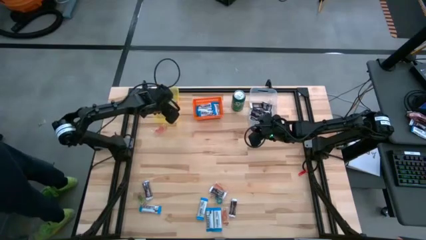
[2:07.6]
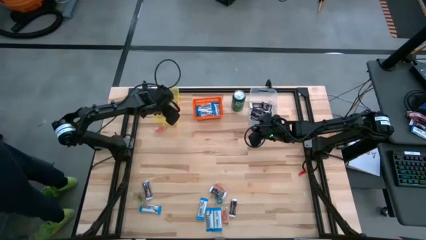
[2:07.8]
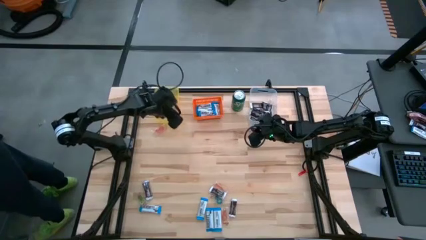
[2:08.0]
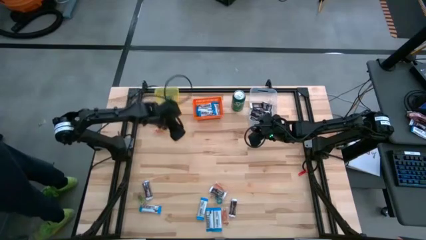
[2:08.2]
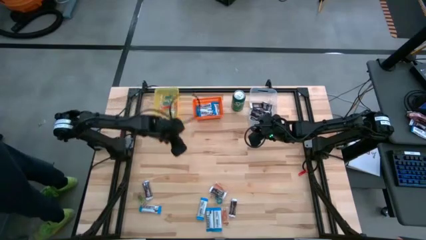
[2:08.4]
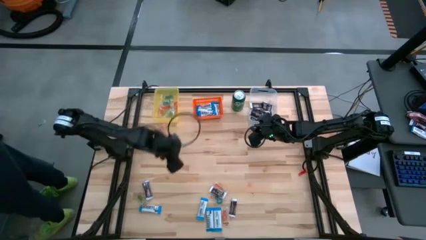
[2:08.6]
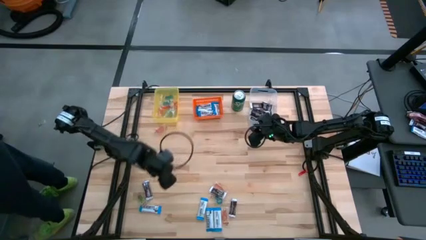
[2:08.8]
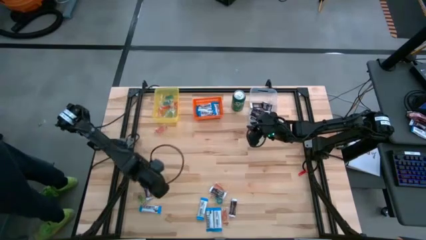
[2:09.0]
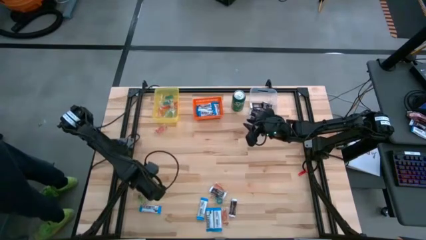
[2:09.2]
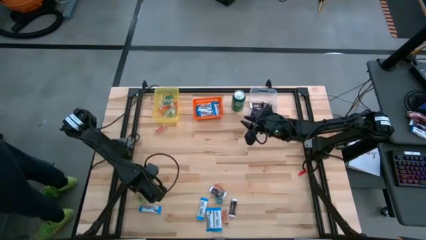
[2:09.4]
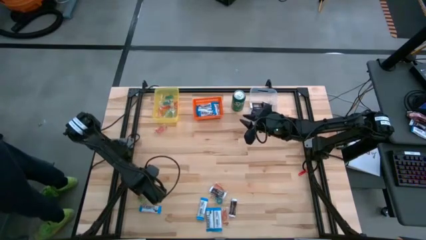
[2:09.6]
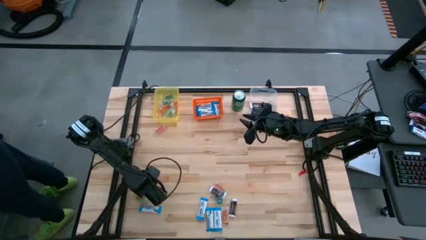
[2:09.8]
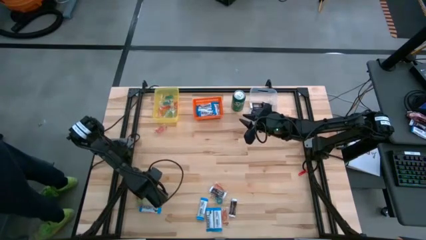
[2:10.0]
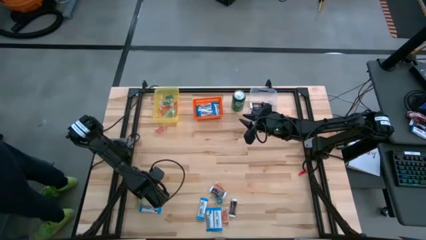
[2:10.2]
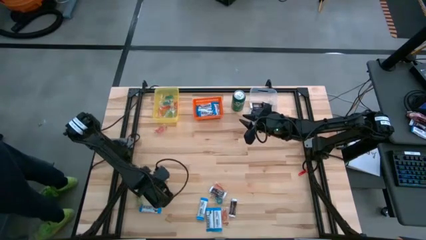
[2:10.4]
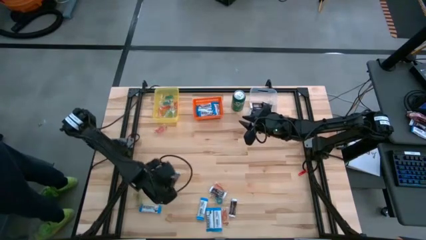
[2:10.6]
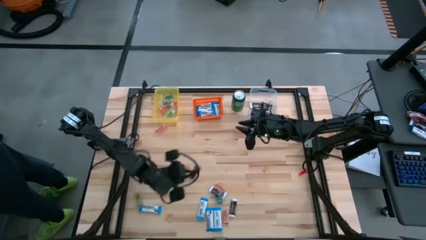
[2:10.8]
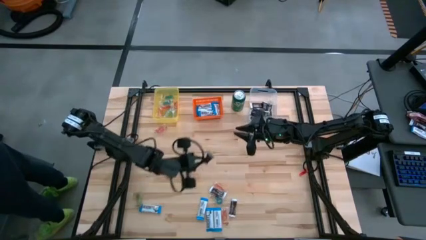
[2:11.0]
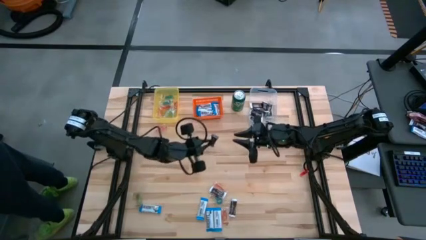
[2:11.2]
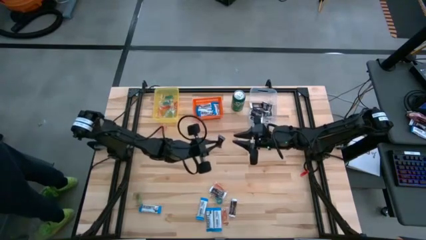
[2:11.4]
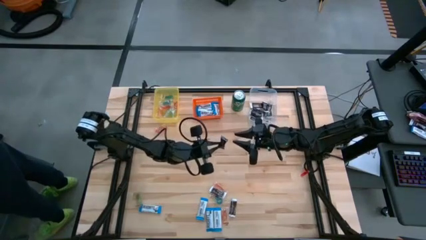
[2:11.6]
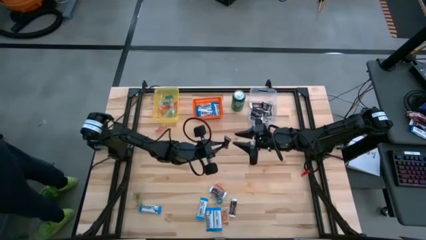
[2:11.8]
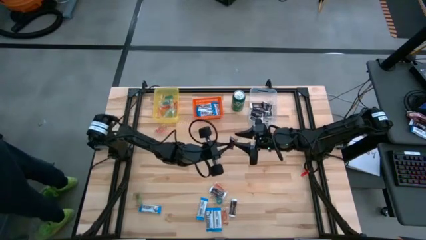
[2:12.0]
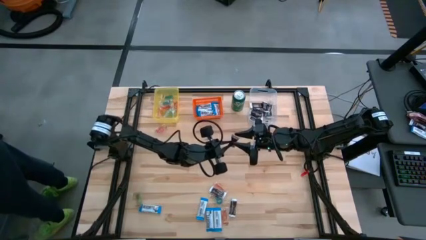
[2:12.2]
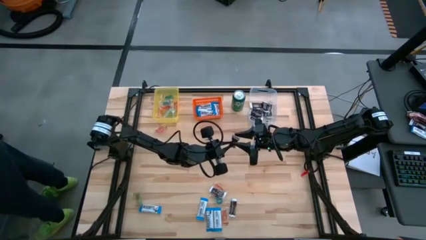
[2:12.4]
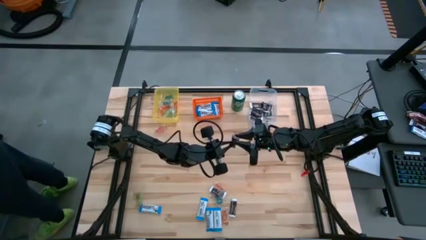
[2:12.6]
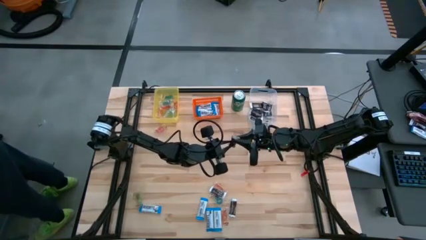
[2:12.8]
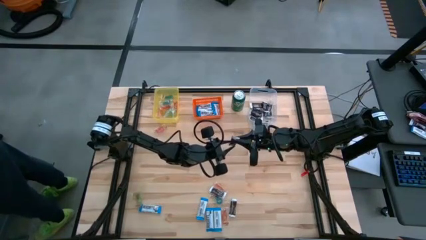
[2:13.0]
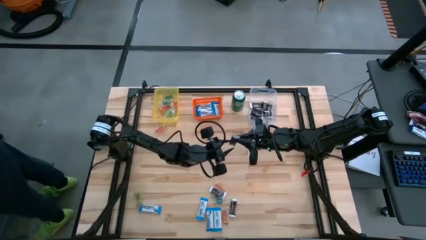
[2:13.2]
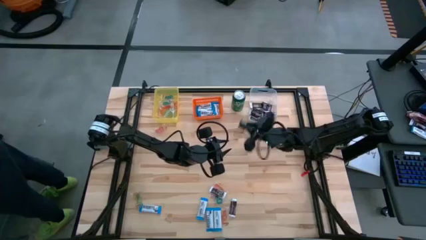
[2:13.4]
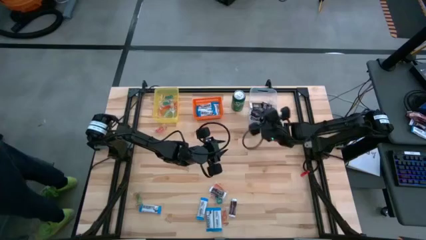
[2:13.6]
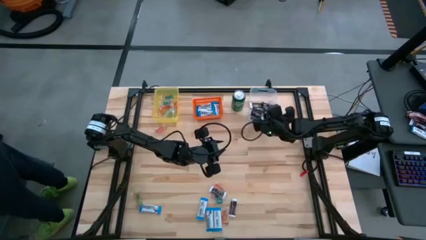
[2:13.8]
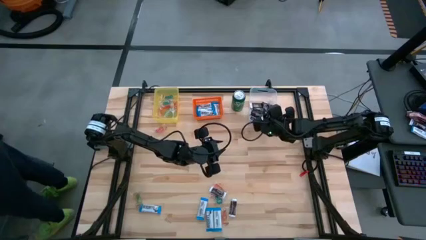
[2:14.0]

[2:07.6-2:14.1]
Task: Organize candy in baskets
Put the brown chocolate into the transparent bin

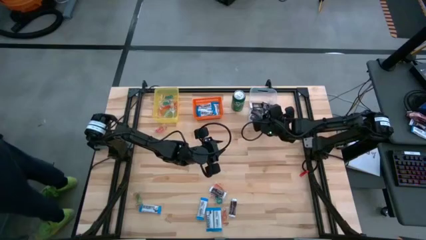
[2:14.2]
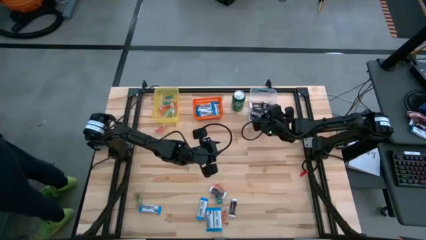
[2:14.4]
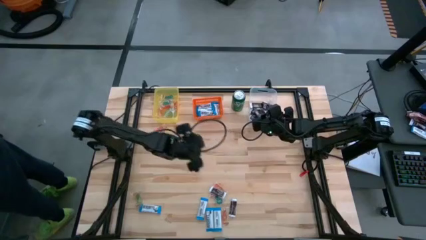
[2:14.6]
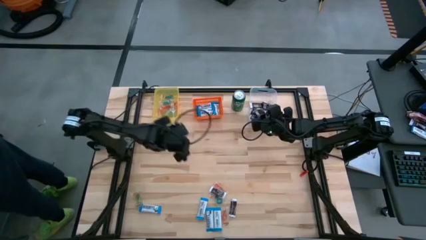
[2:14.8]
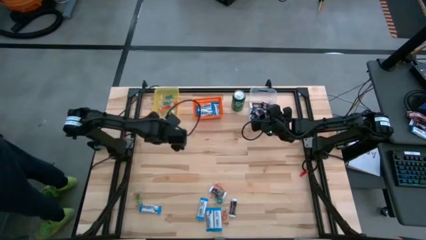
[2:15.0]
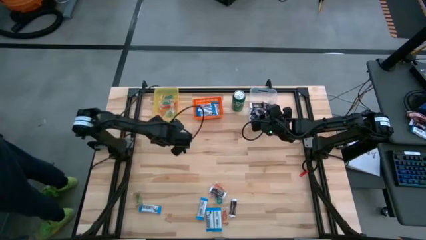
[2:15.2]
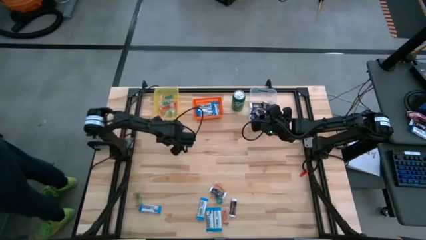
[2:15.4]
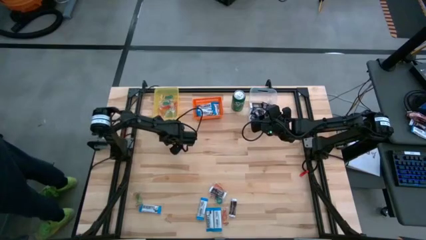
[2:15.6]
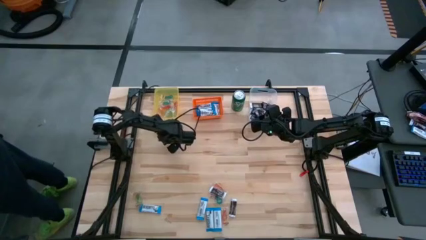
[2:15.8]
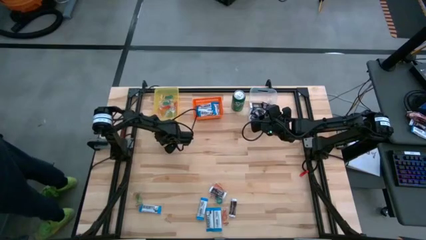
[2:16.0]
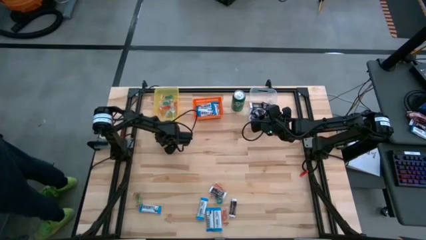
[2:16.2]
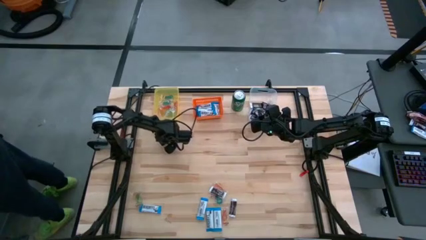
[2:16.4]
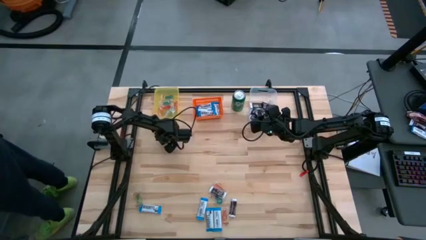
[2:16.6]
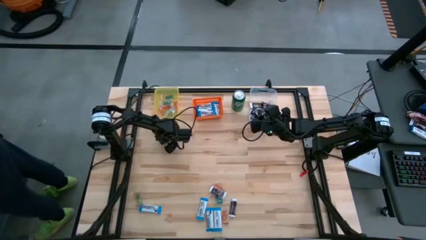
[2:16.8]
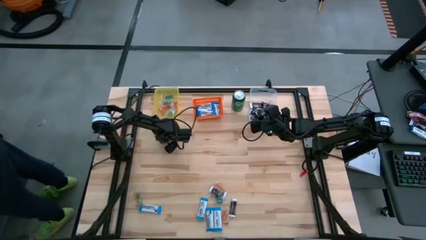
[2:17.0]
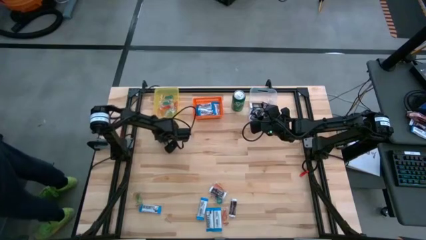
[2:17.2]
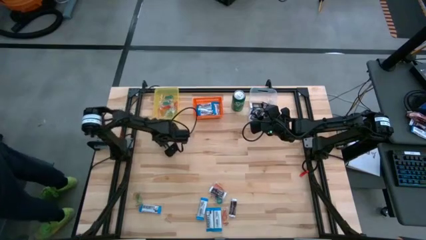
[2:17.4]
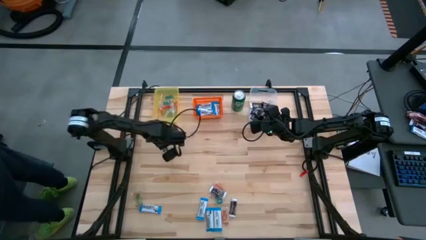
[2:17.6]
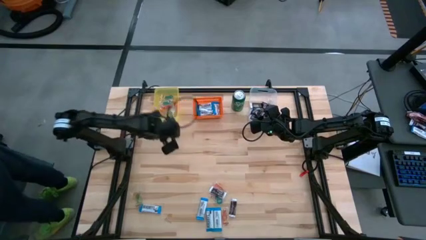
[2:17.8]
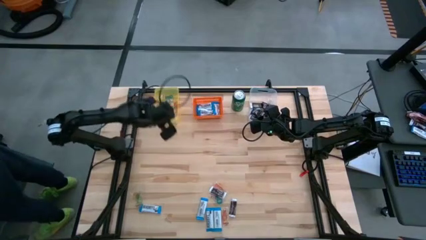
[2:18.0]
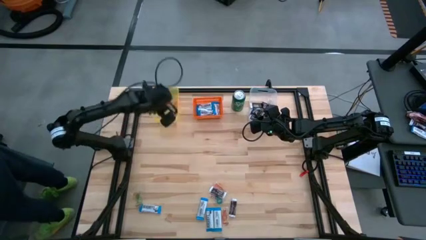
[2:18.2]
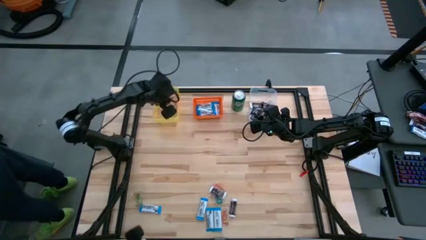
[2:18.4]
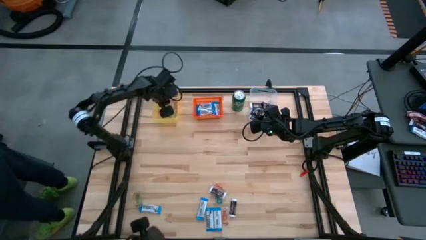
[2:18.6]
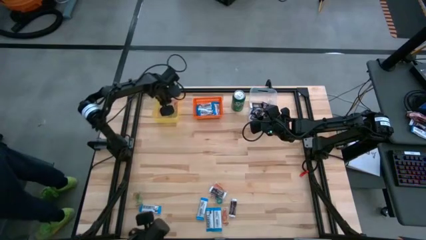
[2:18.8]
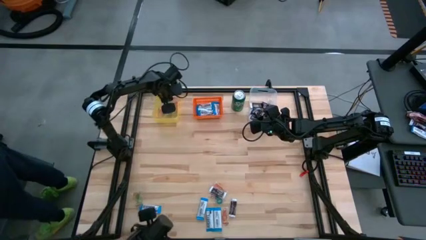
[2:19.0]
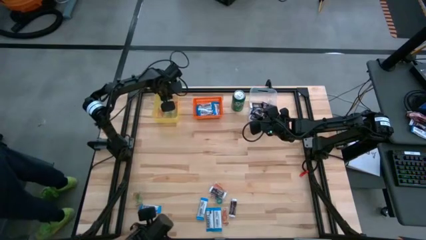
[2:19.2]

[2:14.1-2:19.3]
Put the red gummy into the yellow bin

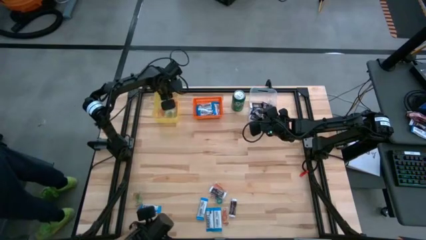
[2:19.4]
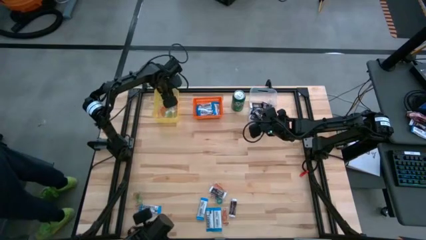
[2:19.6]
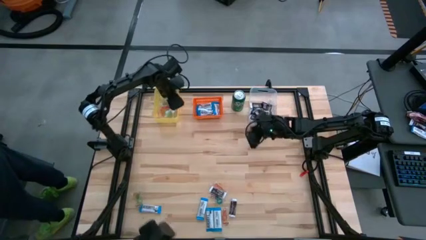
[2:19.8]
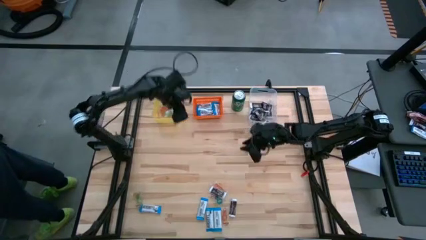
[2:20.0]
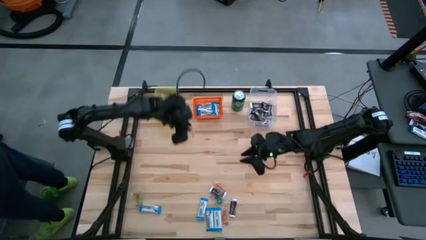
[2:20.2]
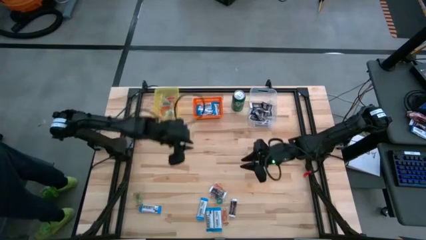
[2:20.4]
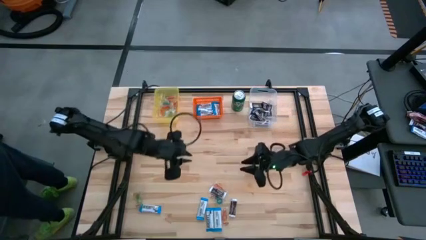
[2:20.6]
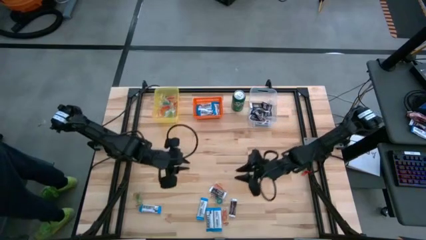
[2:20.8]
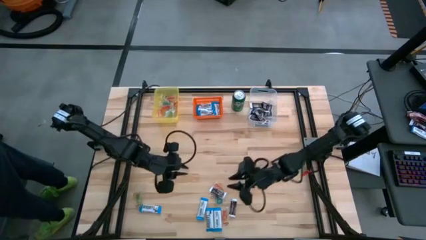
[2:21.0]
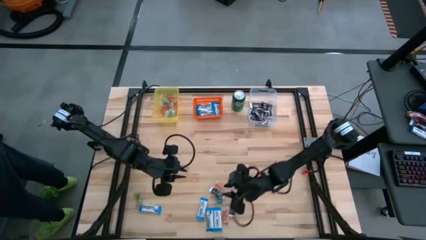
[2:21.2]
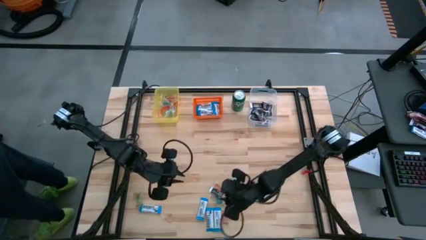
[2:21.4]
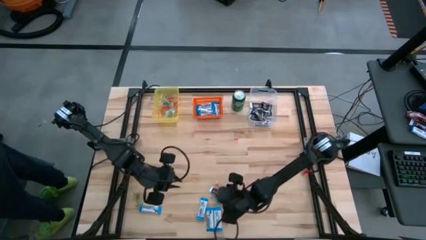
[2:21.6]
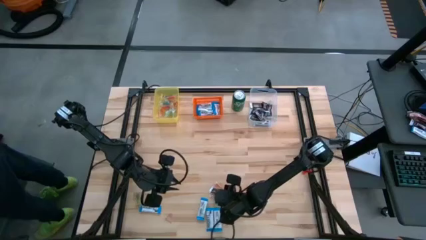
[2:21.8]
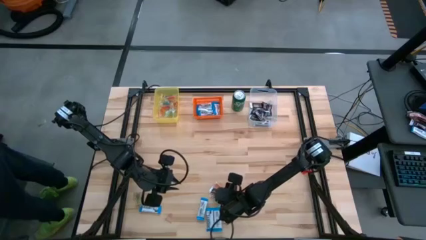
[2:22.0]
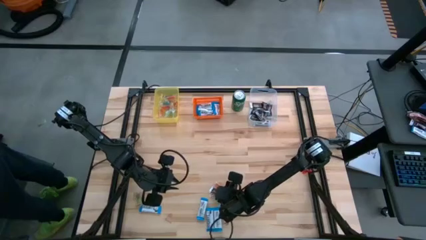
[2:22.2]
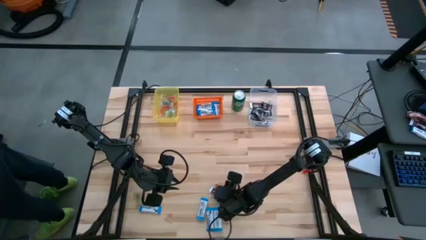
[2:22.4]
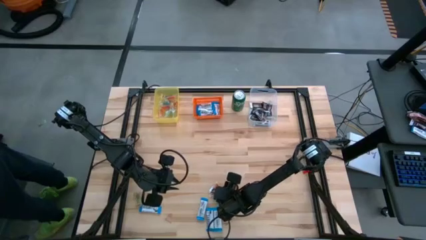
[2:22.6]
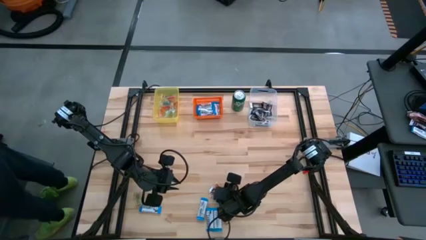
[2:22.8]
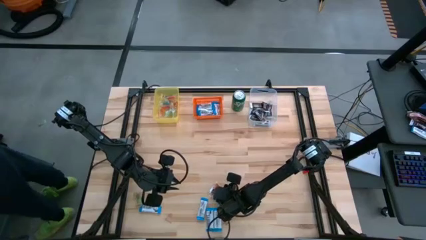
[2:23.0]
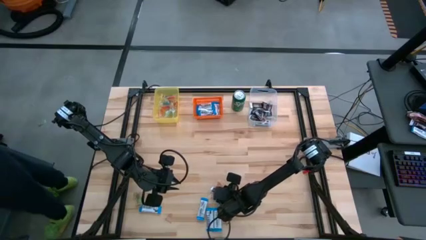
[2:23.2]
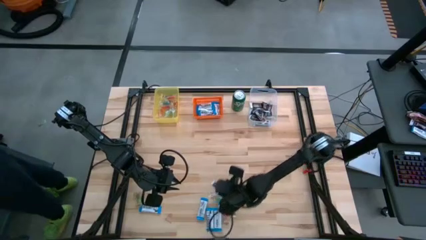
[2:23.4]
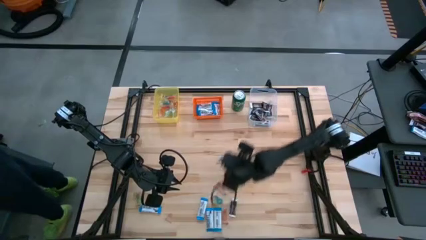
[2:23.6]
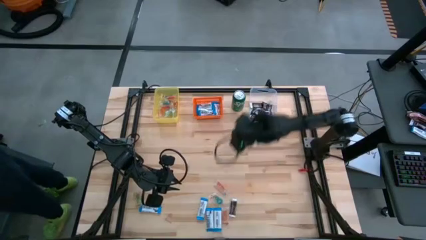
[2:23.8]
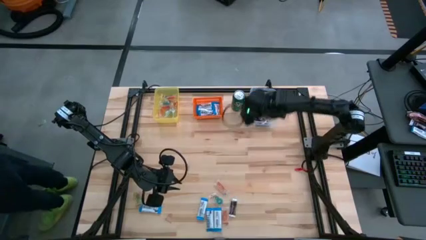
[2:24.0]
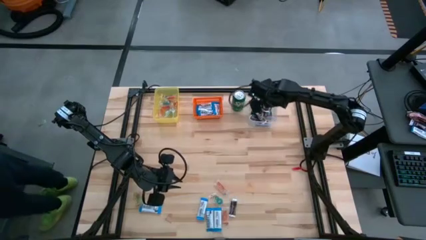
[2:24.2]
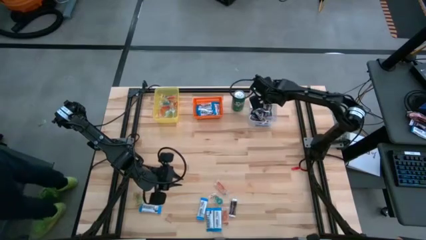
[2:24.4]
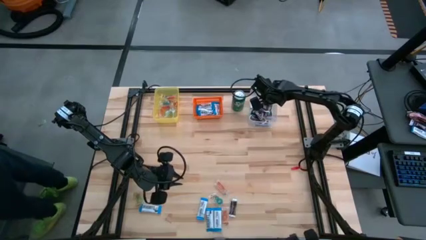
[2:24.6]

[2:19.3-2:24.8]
Put the brown chocolate into the transparent bin
